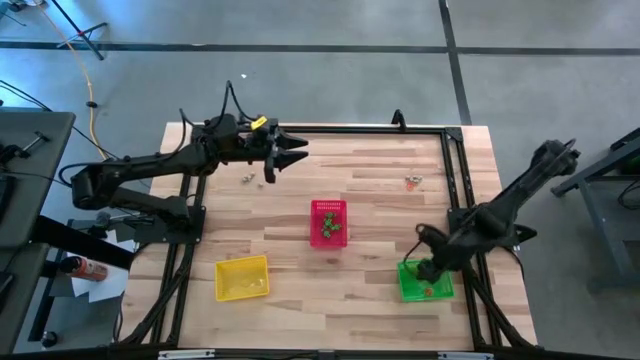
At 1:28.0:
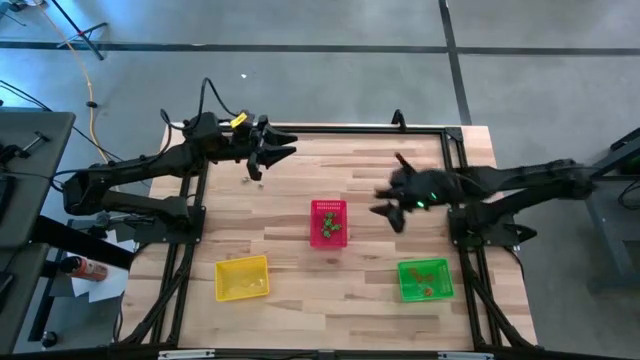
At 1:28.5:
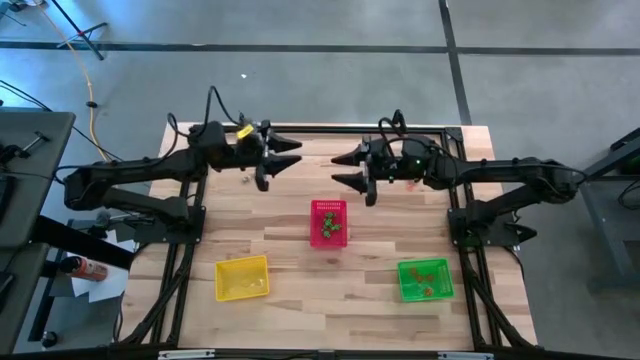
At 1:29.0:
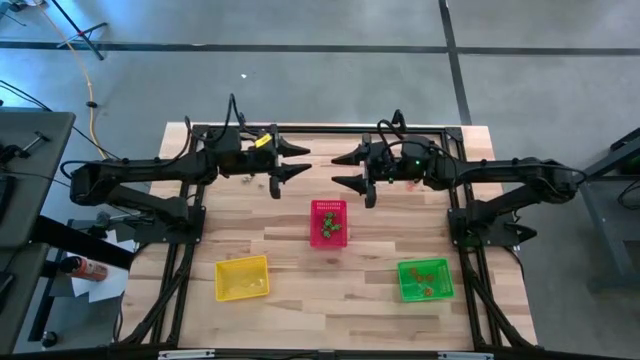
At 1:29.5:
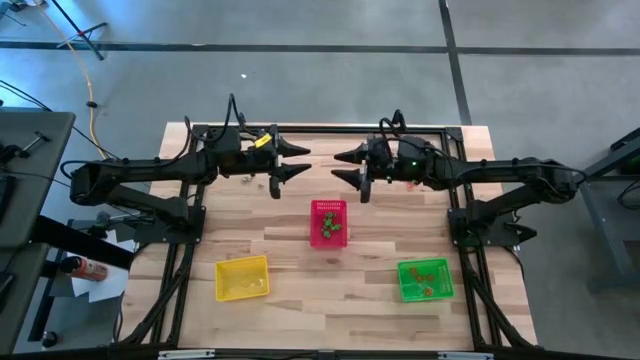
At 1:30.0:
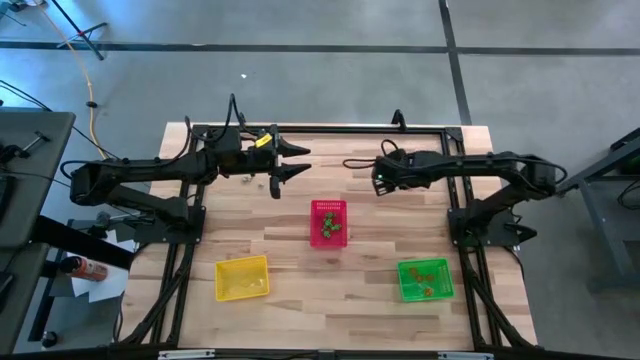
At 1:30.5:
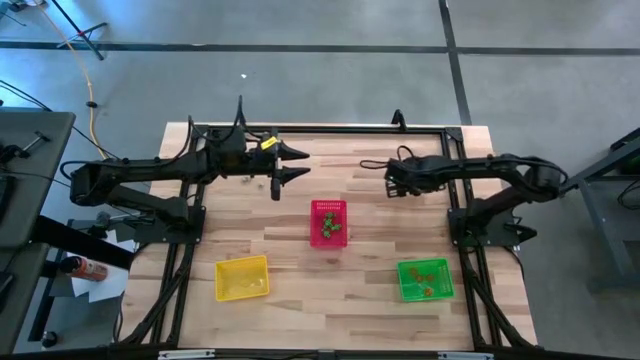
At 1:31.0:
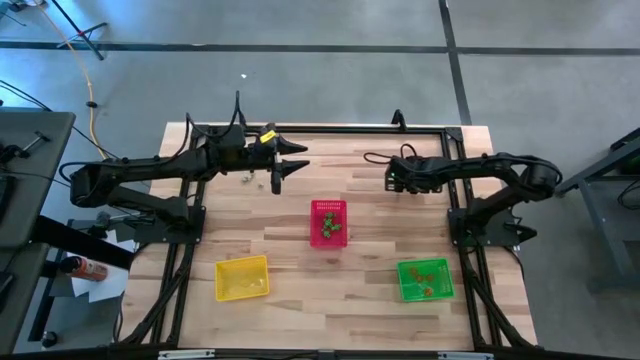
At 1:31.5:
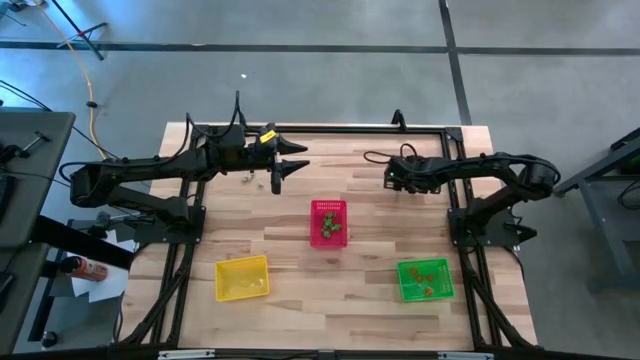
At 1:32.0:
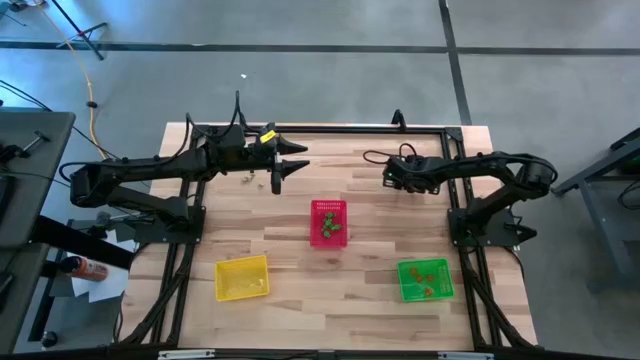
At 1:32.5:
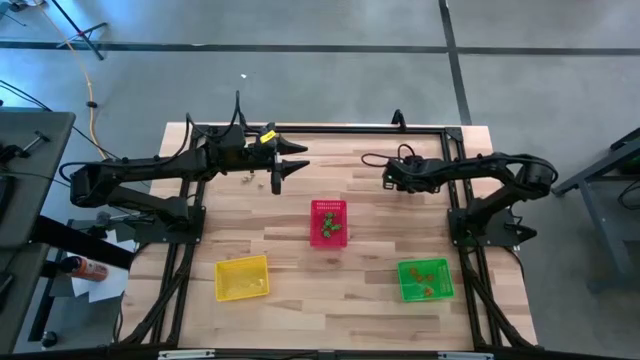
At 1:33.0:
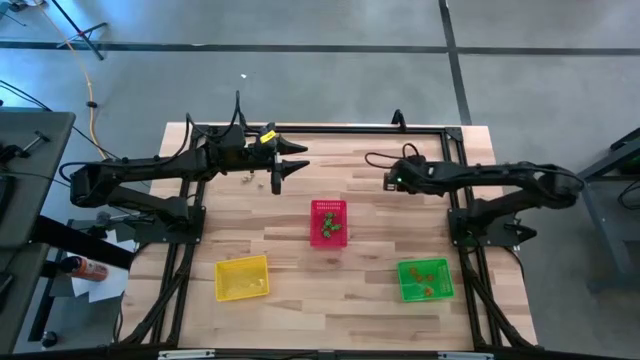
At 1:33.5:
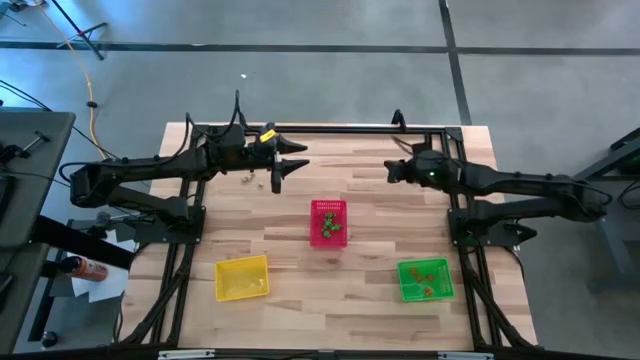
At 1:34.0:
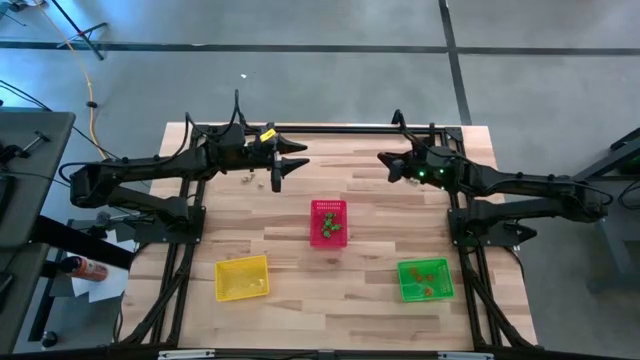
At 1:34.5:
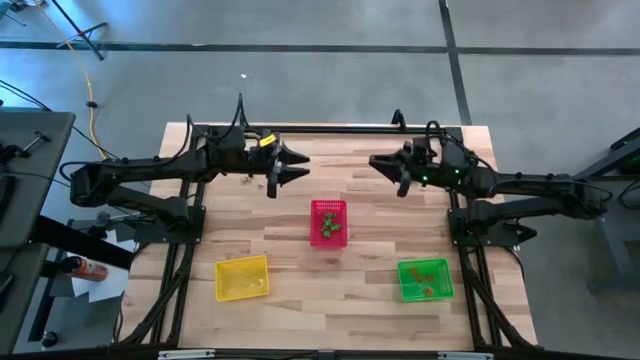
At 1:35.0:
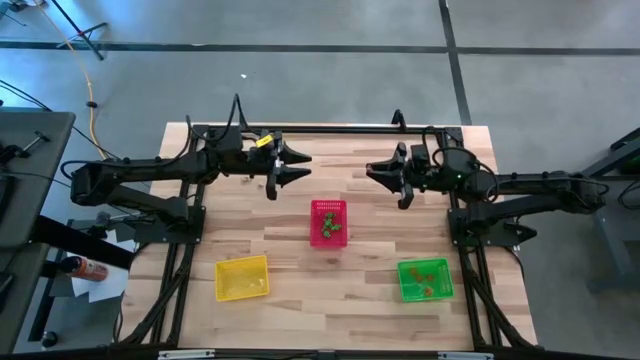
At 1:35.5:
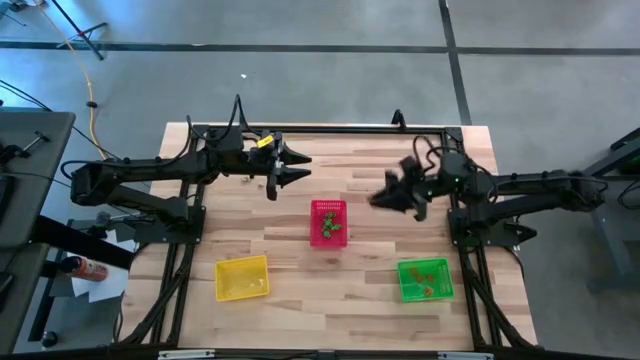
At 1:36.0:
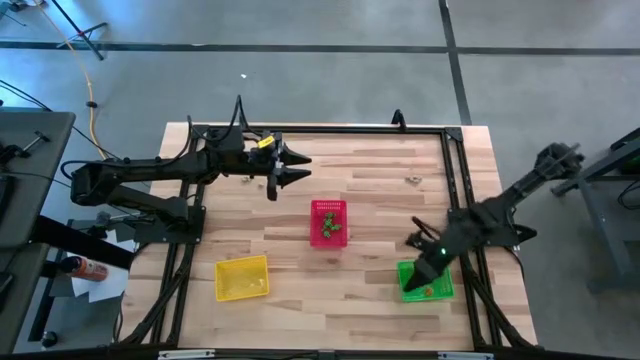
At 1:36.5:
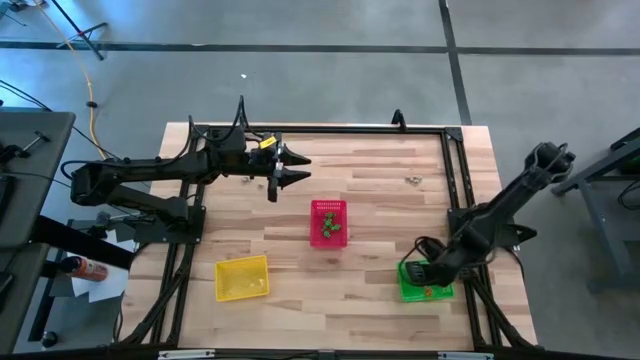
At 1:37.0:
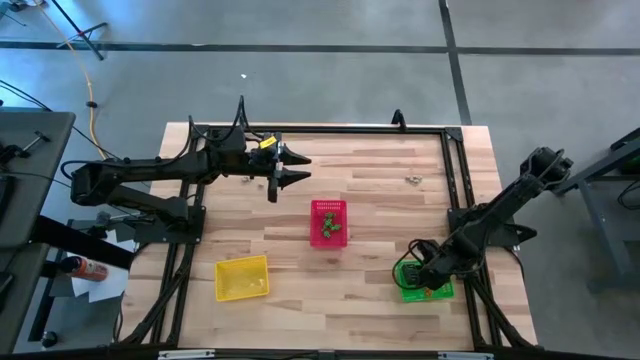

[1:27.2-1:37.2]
Task: Sort Halloween decoration
Put the orange pumpkin toy into the green bin

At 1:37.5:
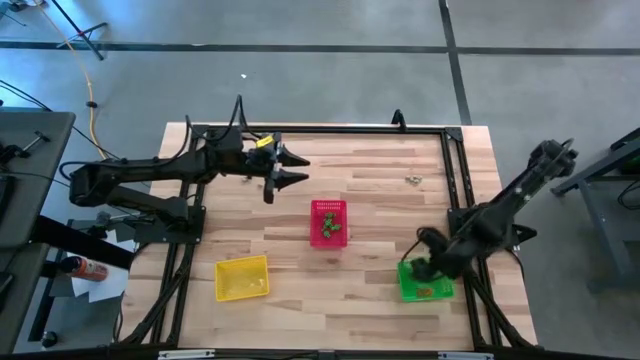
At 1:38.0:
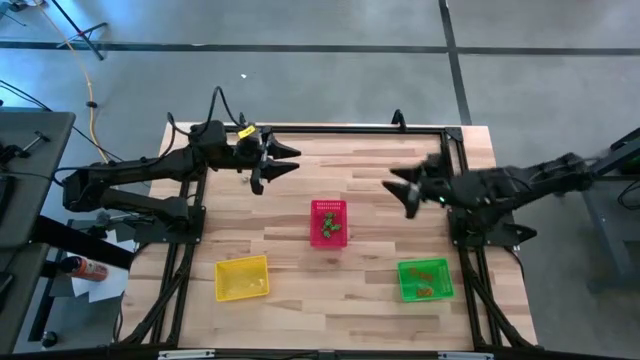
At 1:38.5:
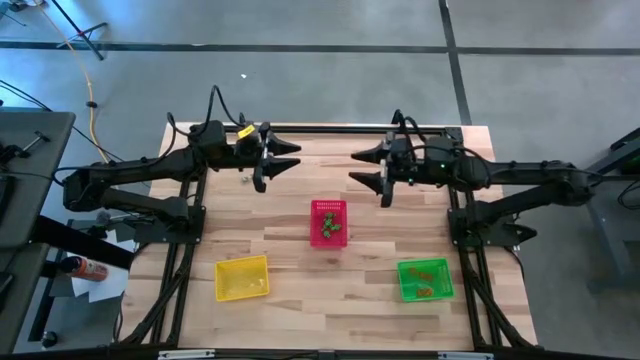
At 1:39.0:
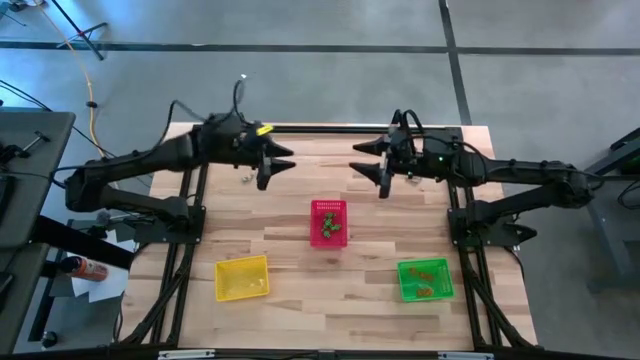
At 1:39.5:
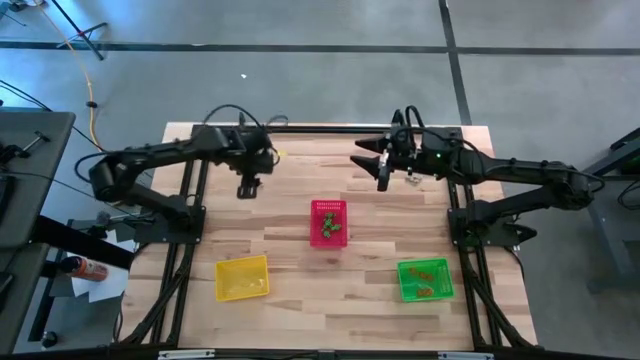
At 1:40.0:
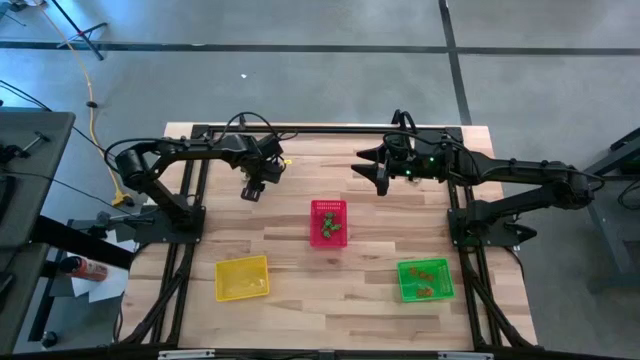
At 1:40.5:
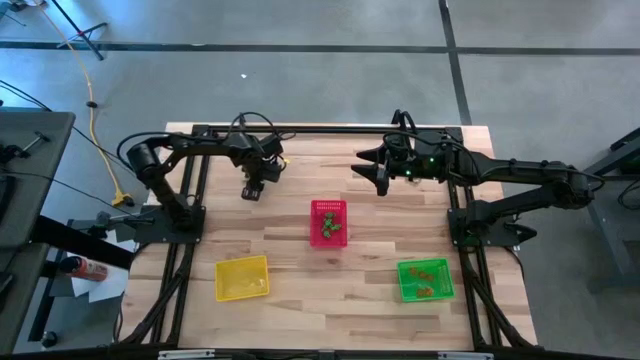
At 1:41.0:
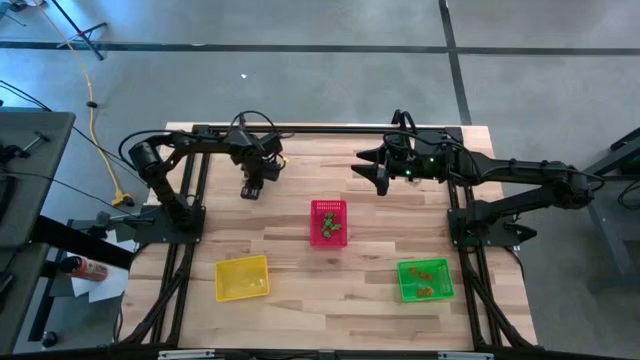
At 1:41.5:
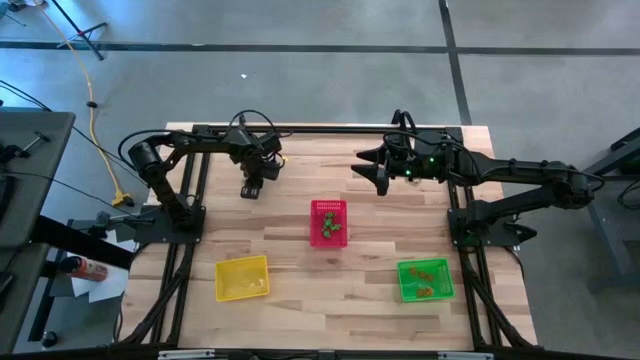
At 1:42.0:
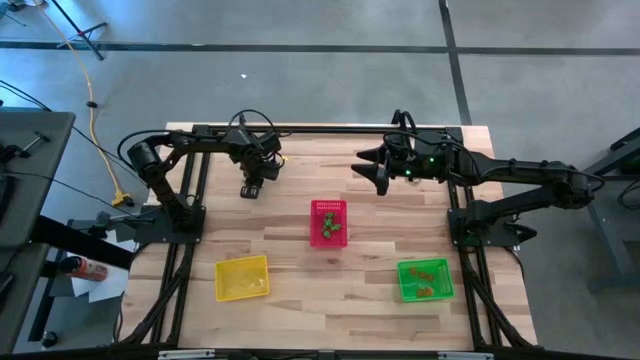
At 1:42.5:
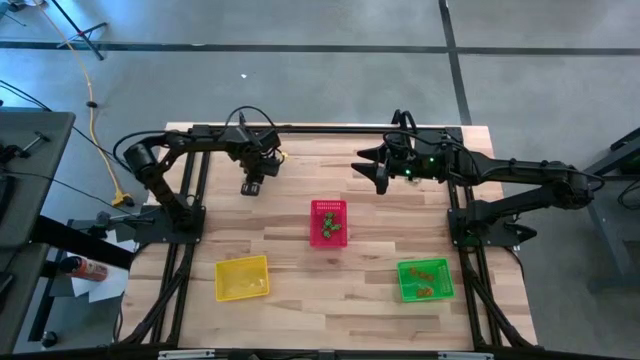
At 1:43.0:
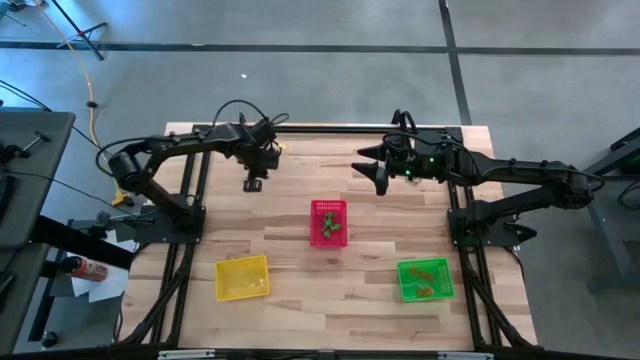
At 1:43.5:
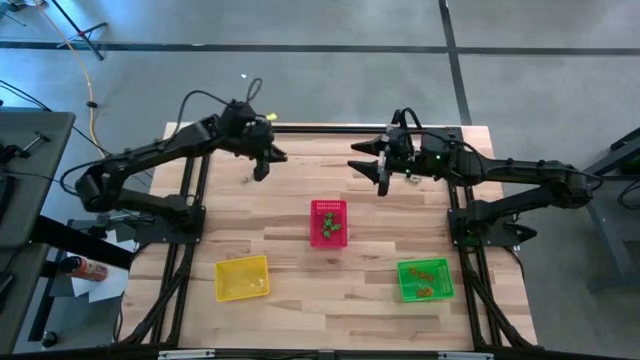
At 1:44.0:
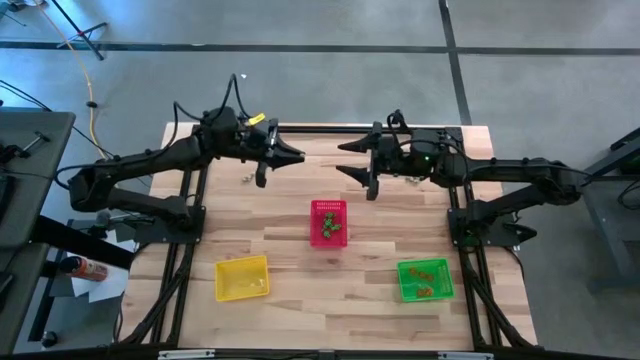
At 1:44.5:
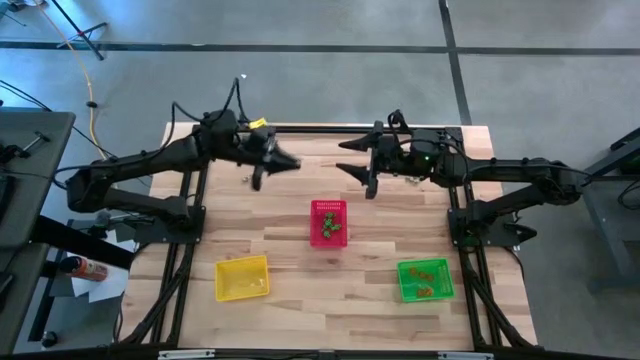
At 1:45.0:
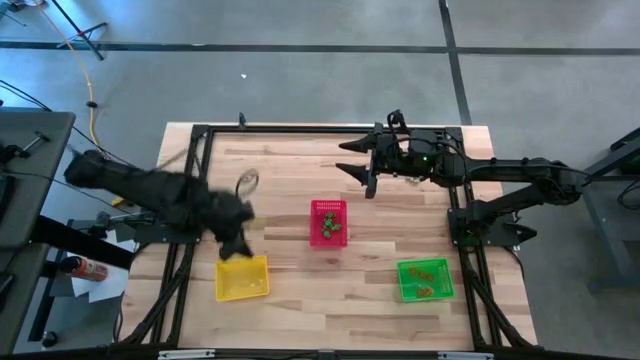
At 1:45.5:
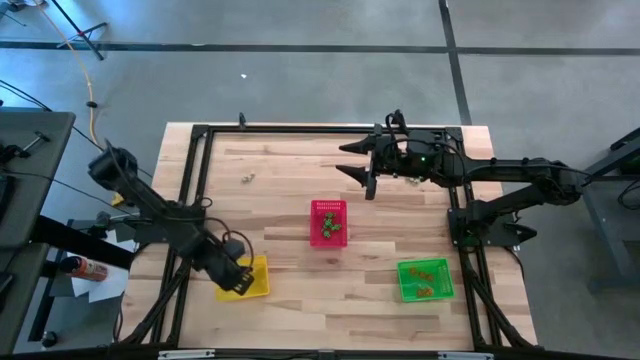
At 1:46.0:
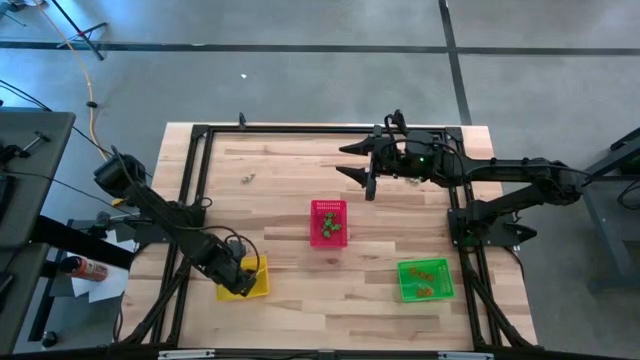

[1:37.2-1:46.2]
Put the white skull toy into the yellow bin

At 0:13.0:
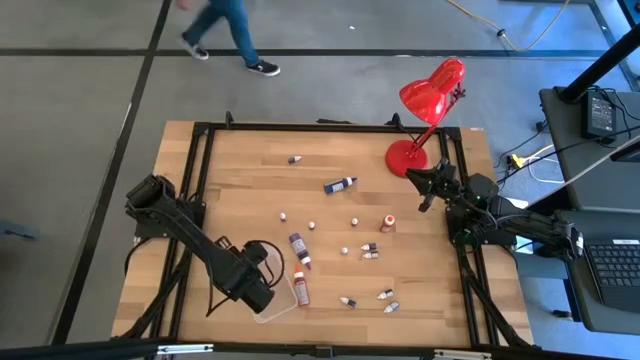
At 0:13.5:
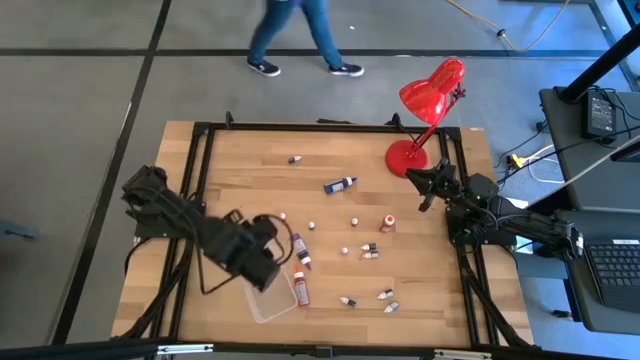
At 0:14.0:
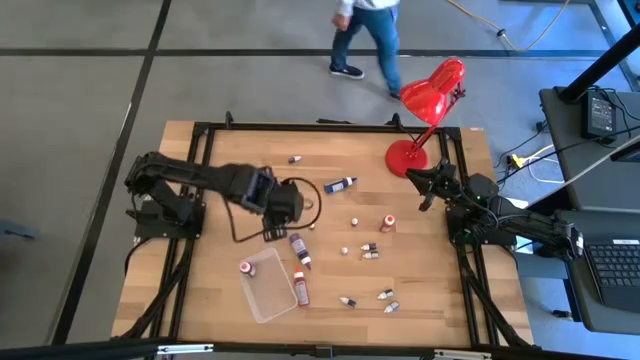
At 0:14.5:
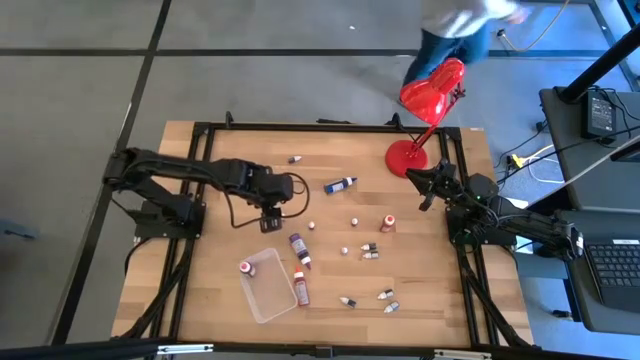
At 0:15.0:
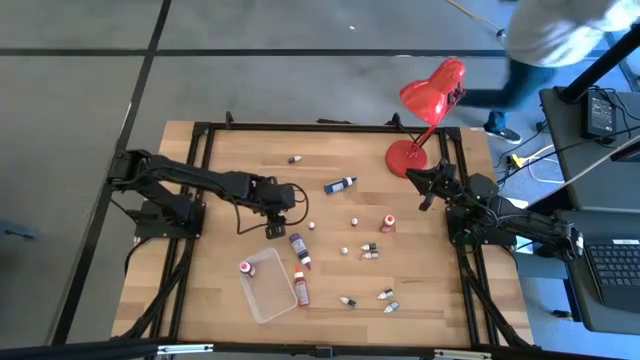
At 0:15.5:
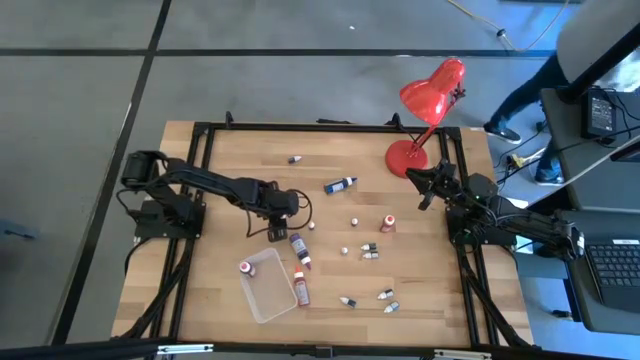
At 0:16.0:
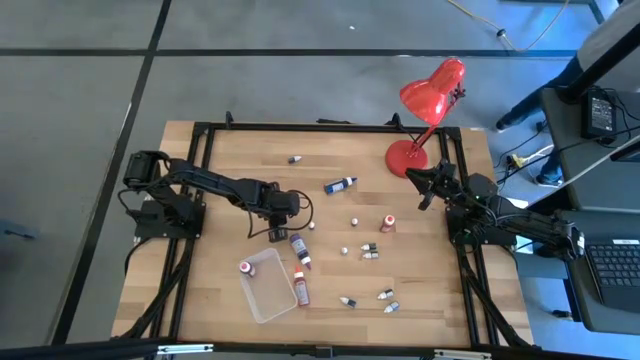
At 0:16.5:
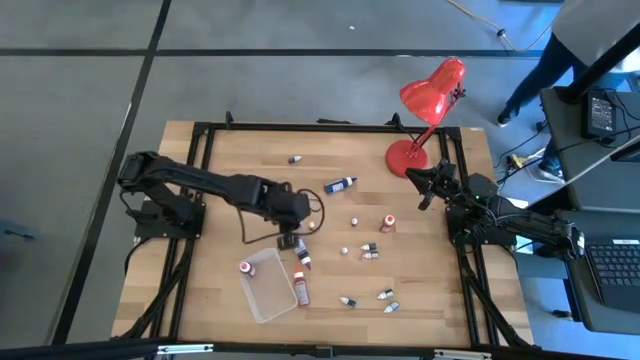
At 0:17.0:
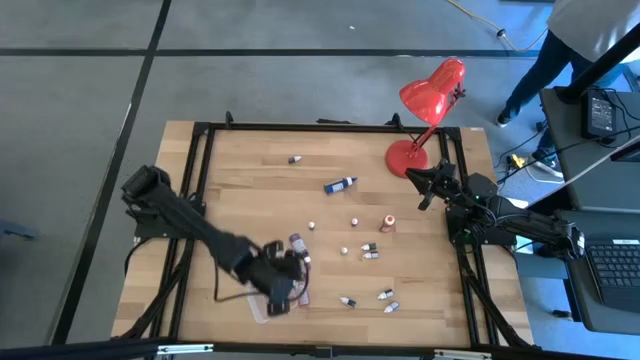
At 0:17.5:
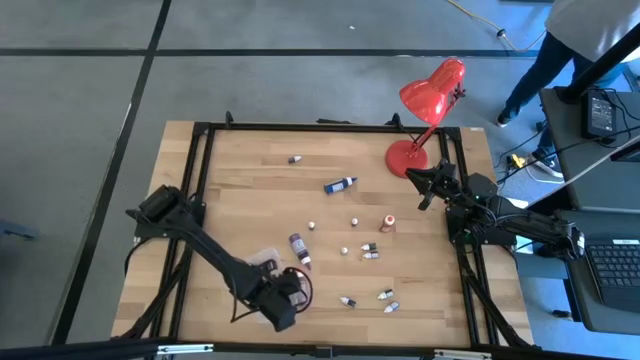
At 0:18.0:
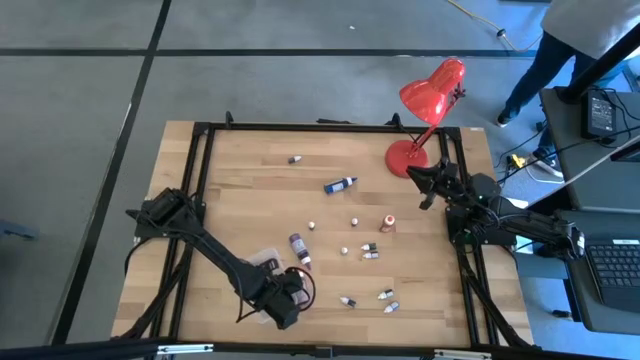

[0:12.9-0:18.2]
Task: Pick & Place food coloring
Put the pink food coloring bottle into the transparent bin
